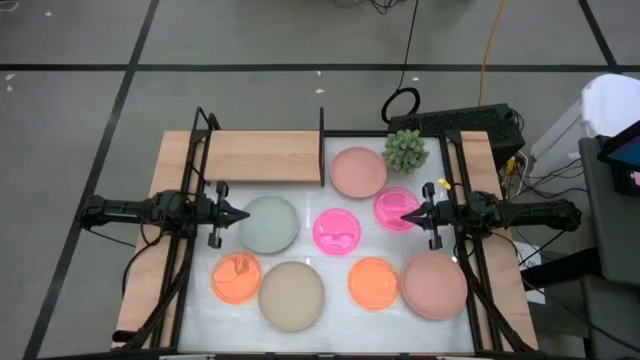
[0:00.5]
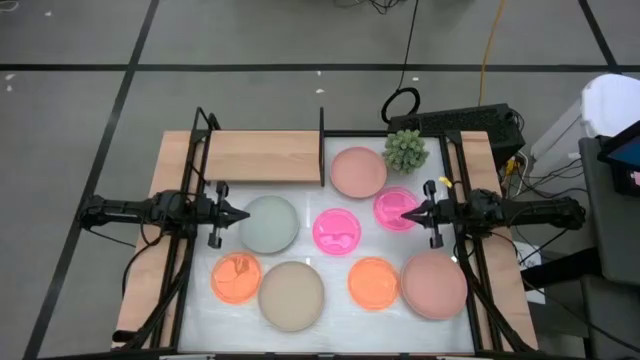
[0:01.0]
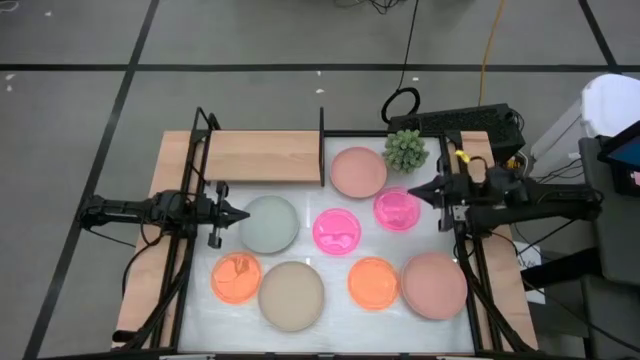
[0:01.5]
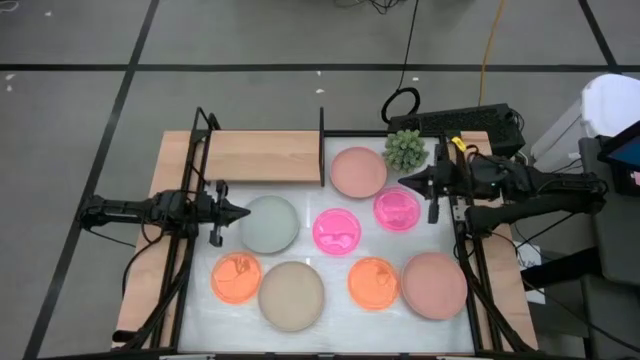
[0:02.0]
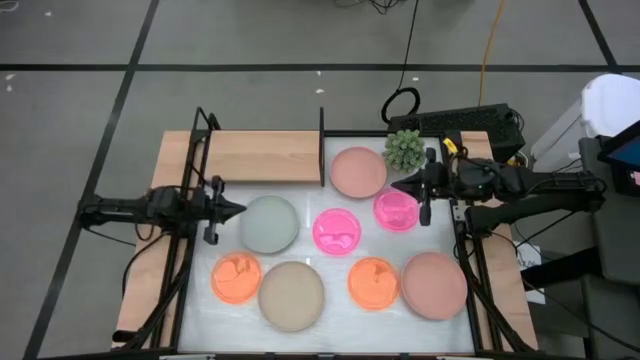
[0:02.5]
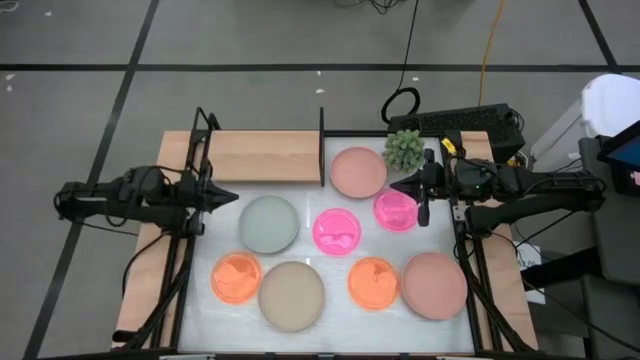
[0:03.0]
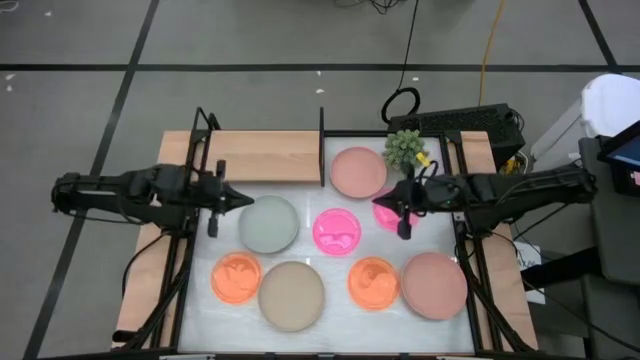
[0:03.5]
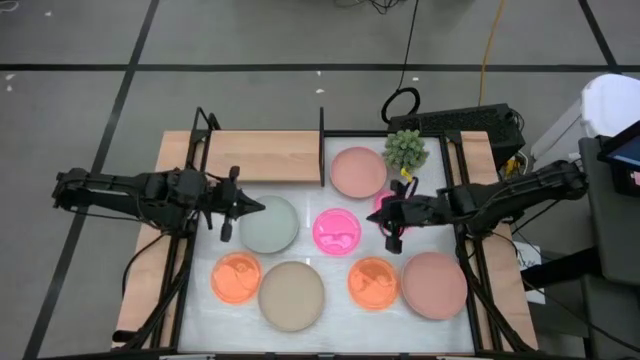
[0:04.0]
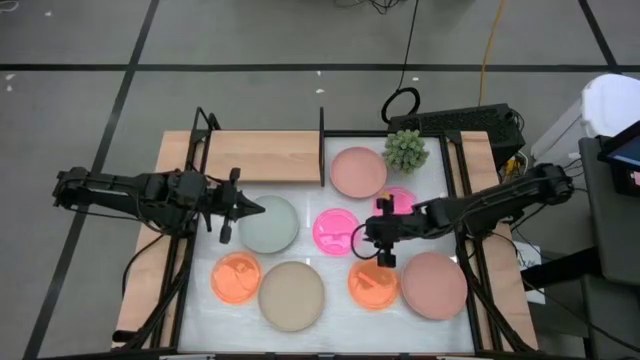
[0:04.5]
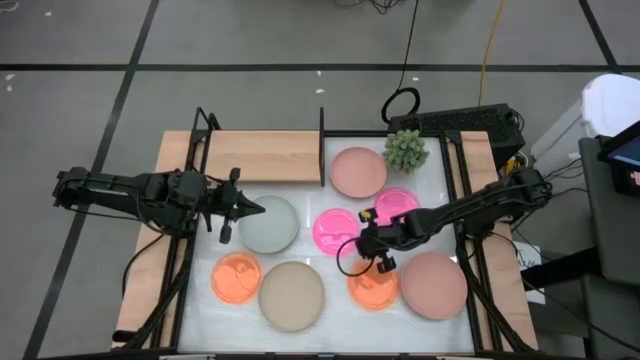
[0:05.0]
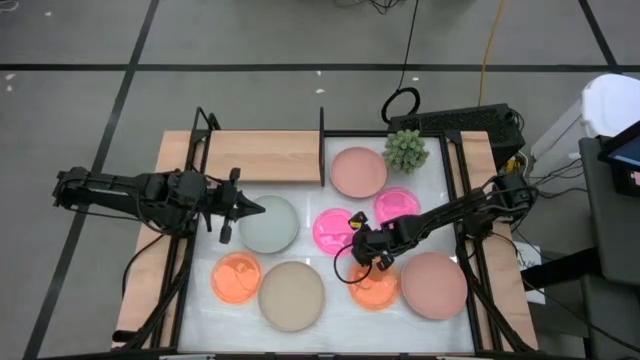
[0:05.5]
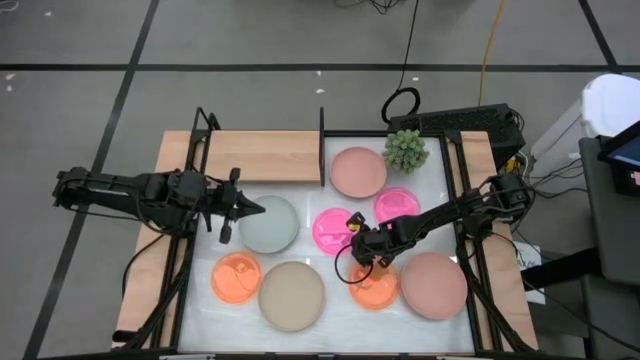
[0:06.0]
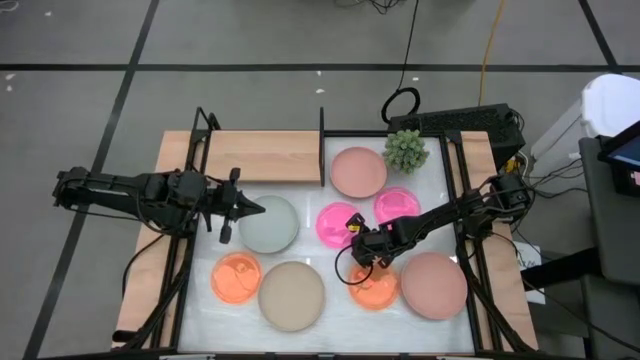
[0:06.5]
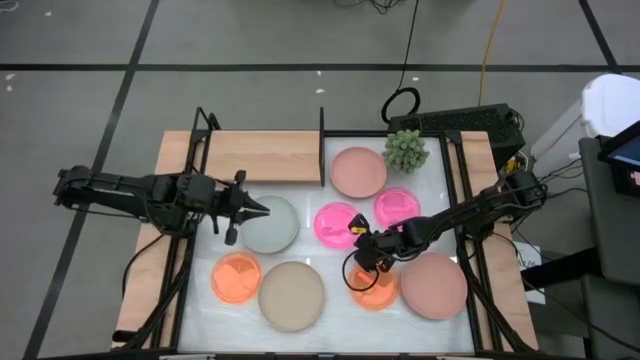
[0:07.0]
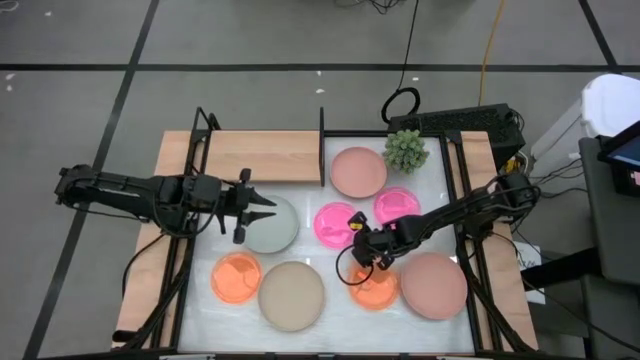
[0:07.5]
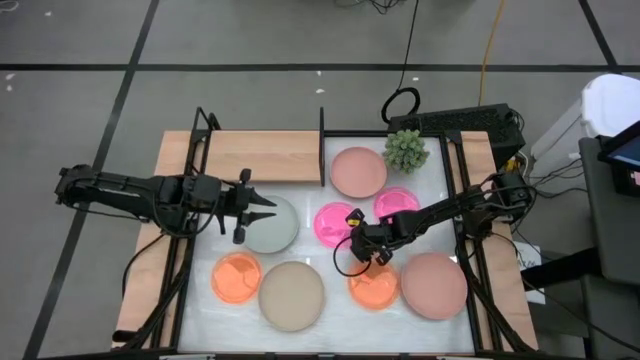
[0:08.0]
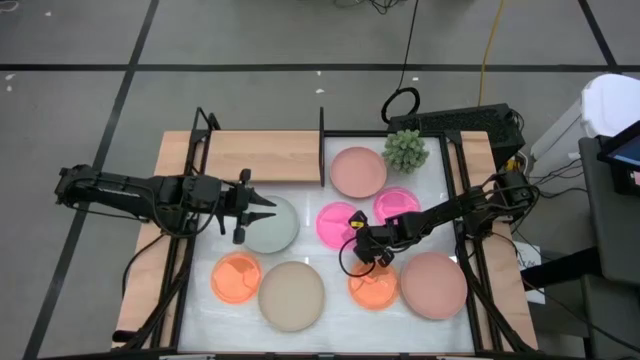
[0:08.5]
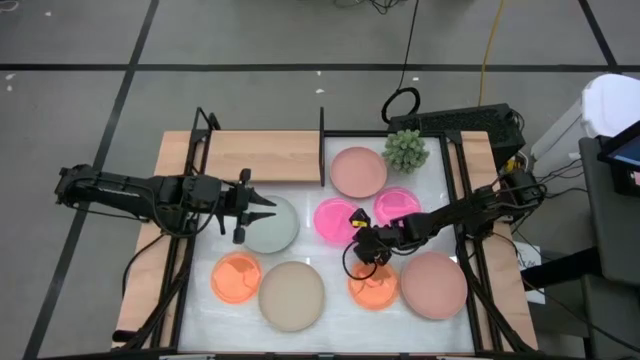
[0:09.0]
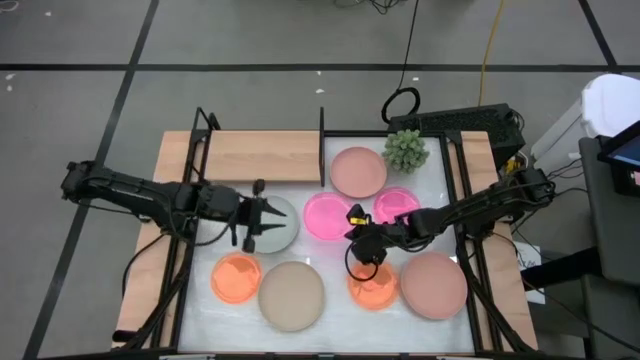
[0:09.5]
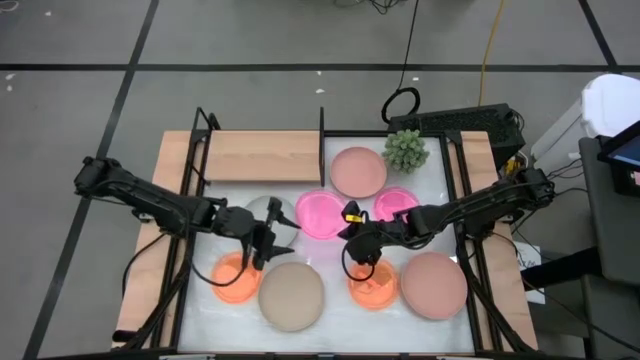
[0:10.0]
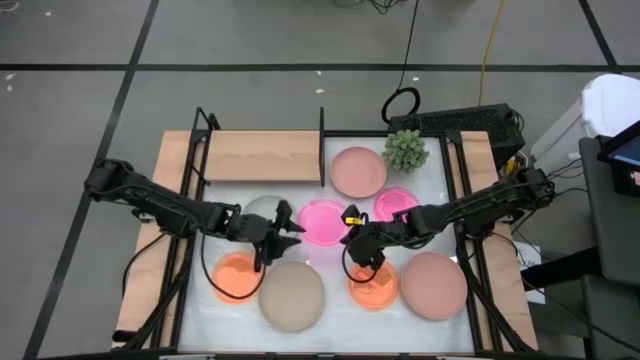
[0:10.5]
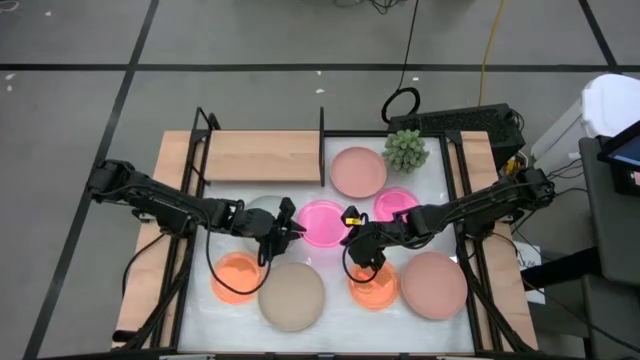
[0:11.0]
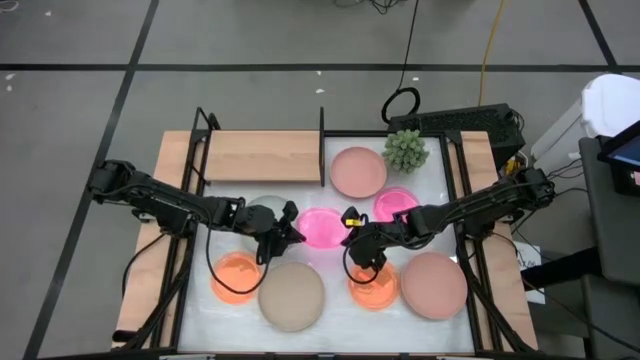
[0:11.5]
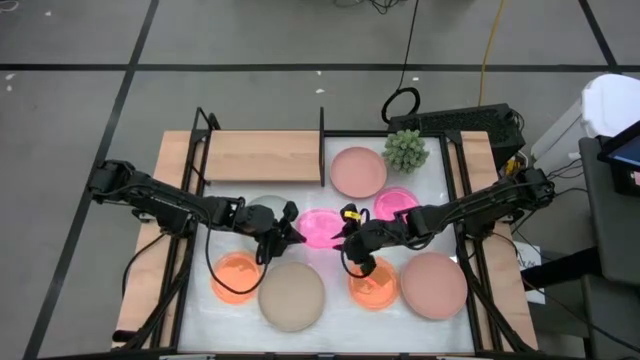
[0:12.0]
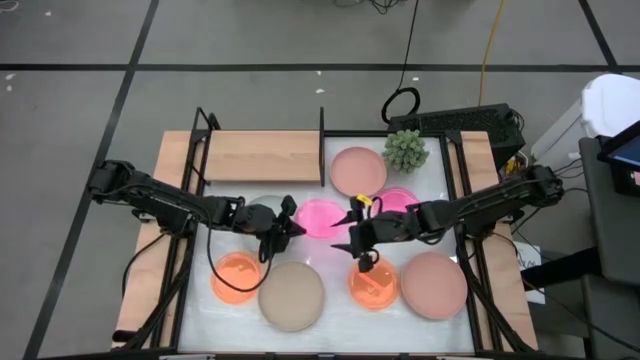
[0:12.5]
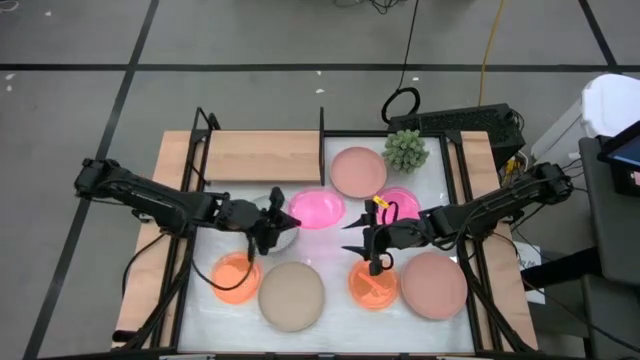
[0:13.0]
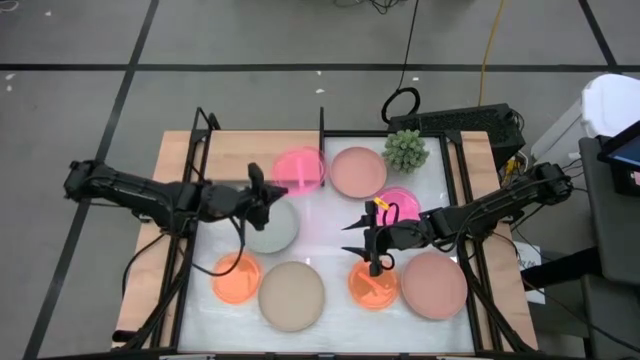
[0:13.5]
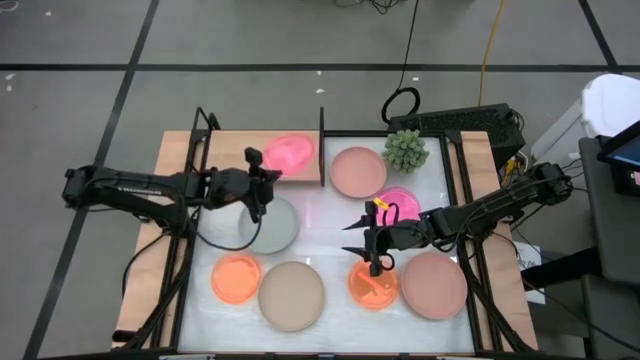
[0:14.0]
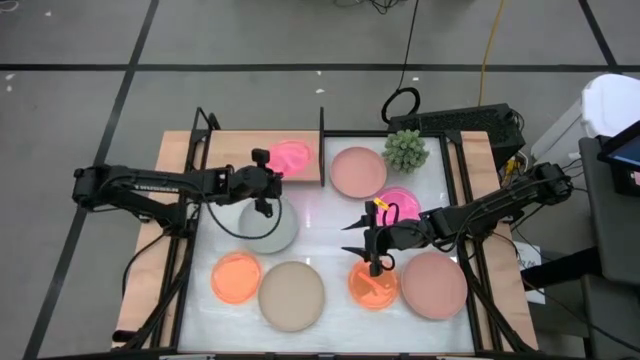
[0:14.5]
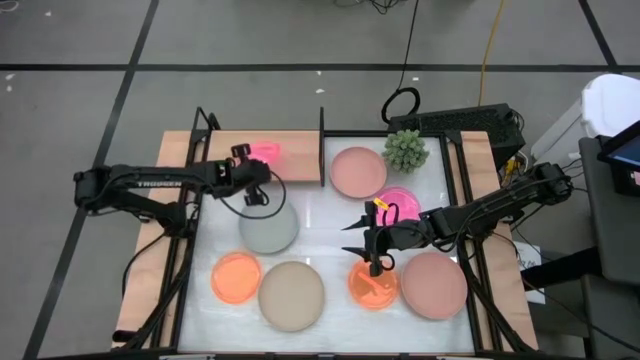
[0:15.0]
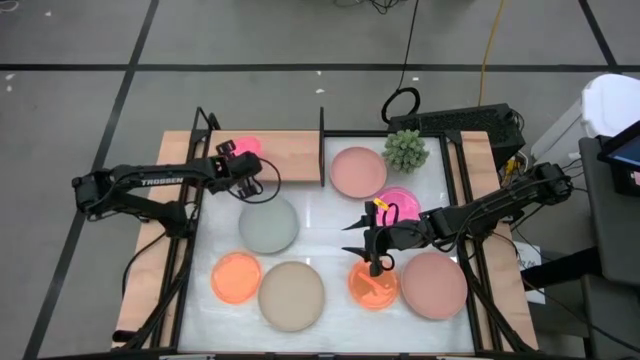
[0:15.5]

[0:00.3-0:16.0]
Task: Place and stack plates onto a shelf
Put the left pink plate on the shelf
